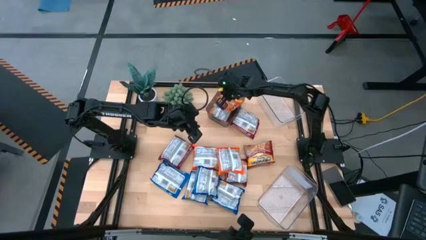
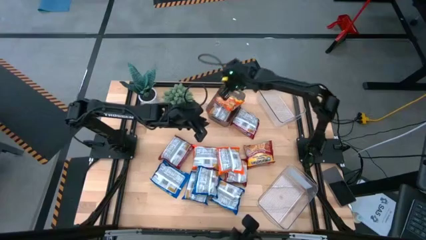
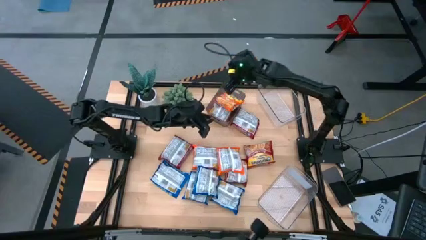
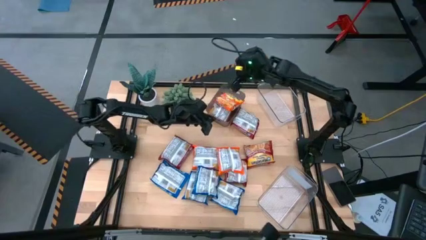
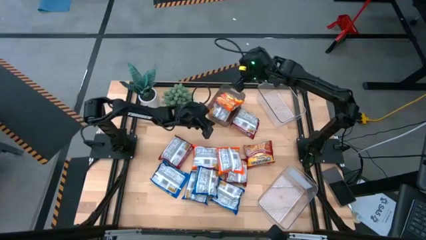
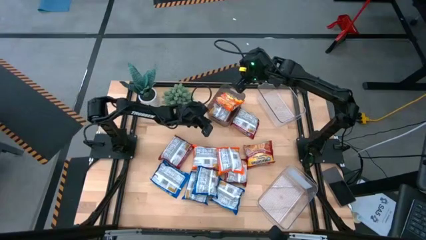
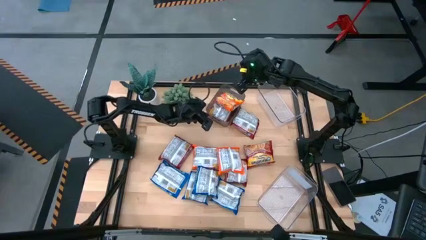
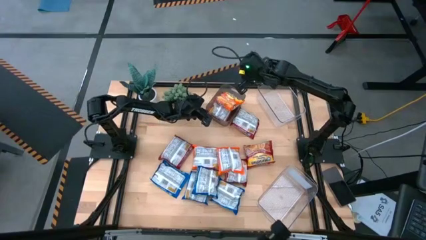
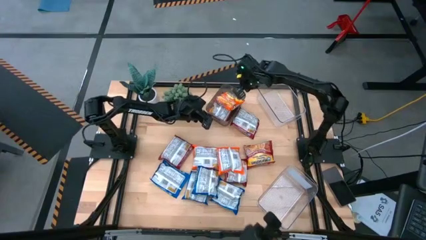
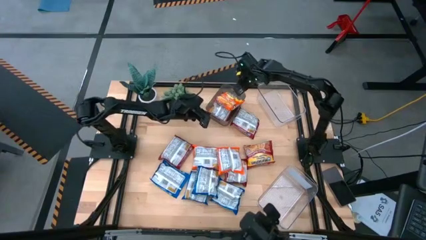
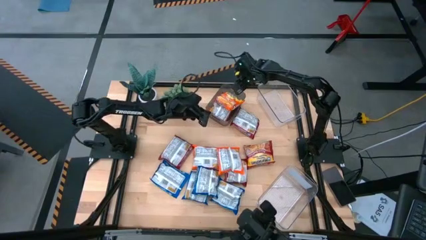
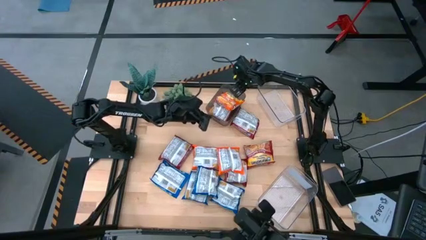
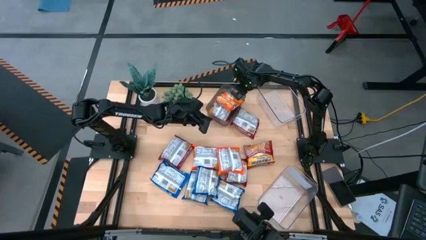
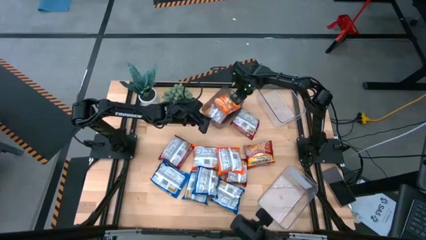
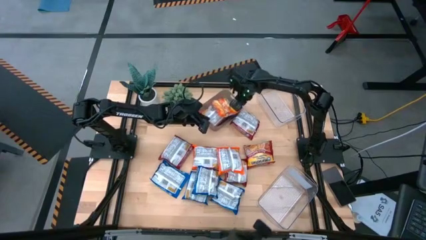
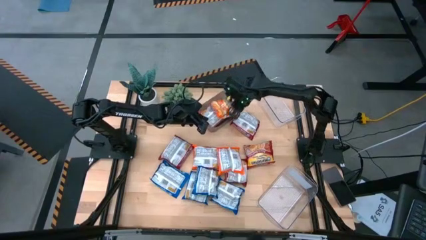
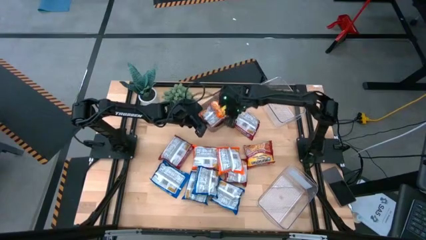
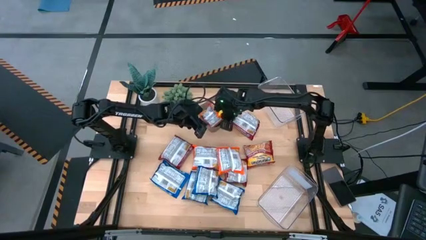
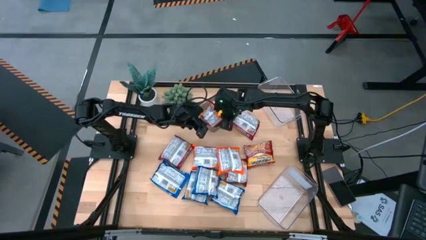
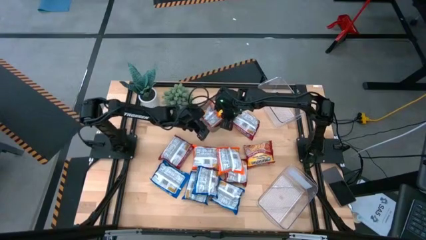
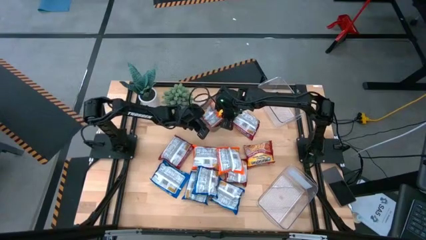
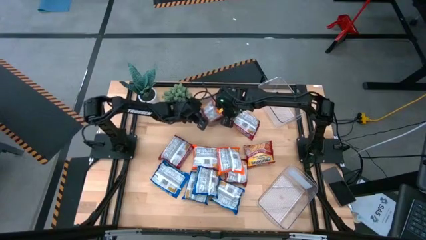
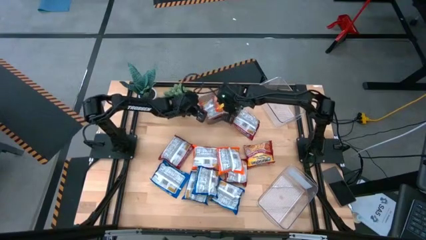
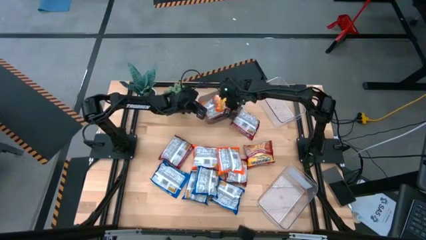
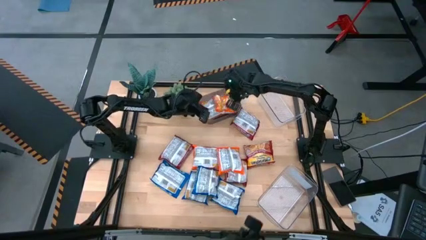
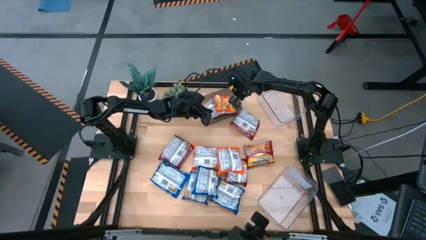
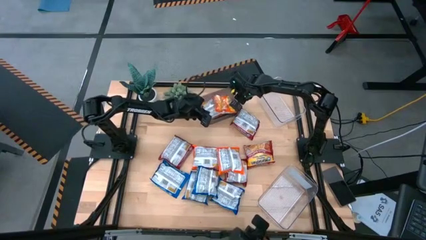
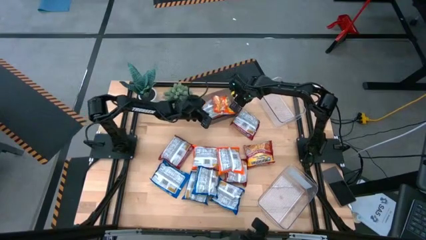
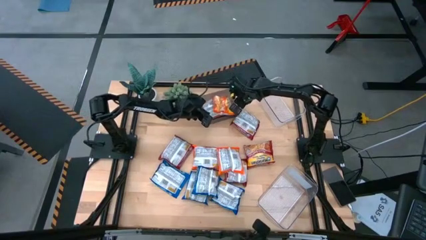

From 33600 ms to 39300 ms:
Task: Sort Maruchan noodles
Adjust the black bin

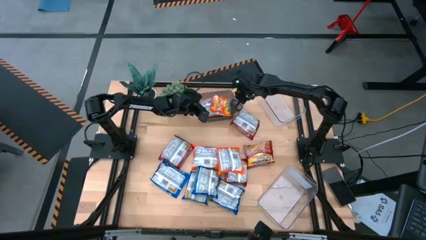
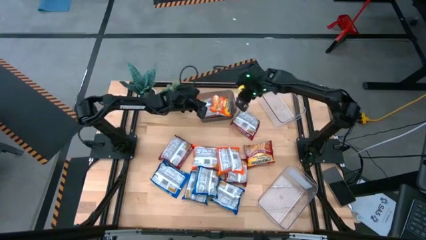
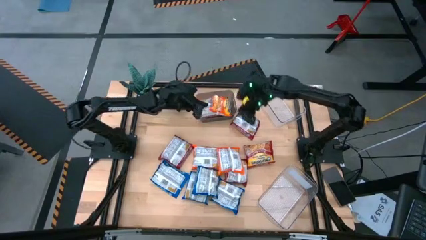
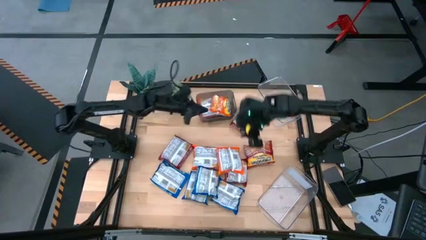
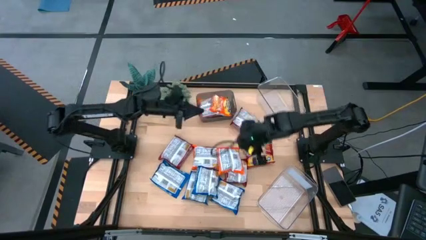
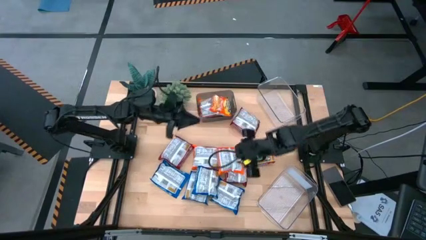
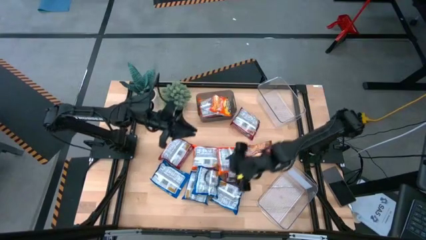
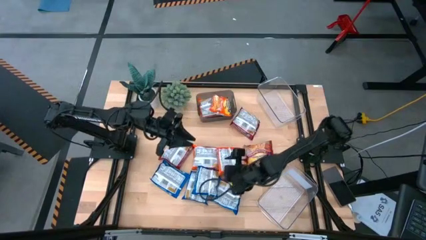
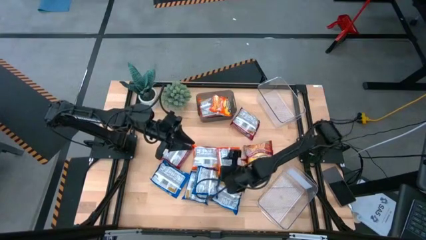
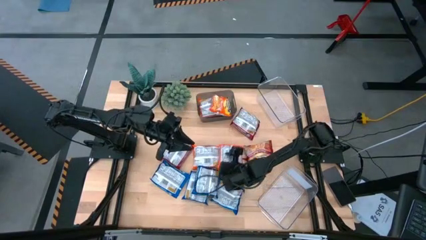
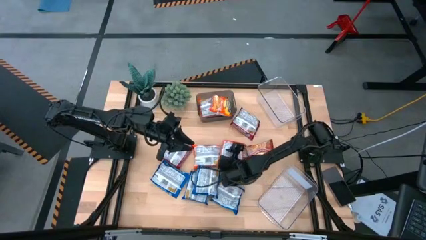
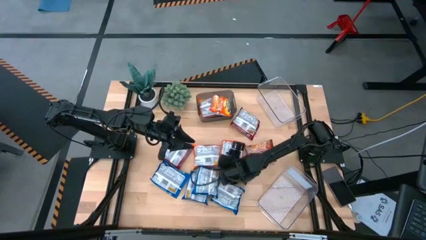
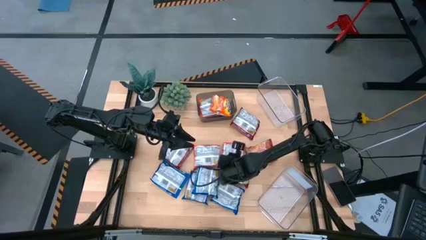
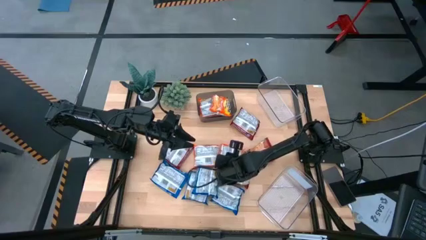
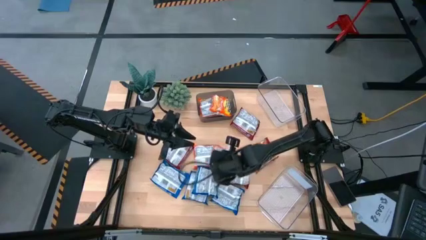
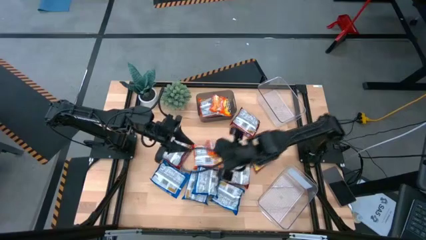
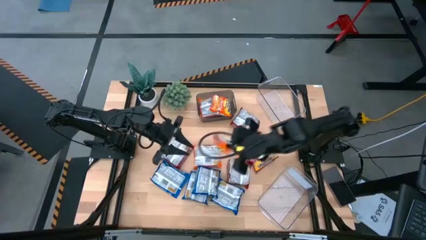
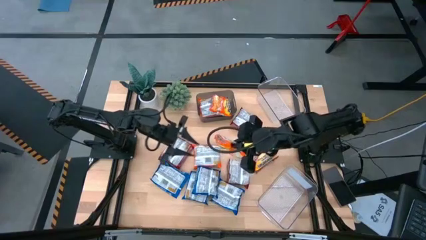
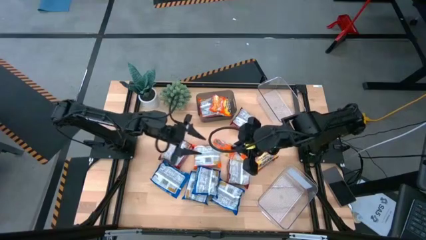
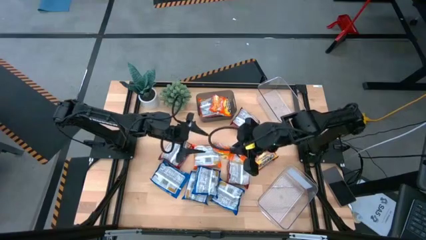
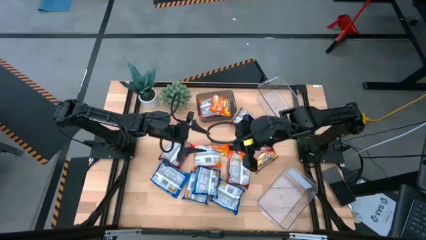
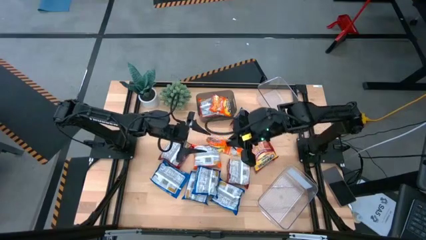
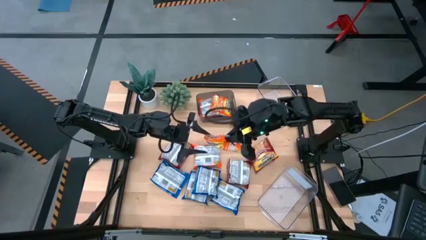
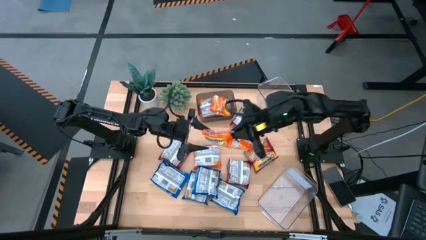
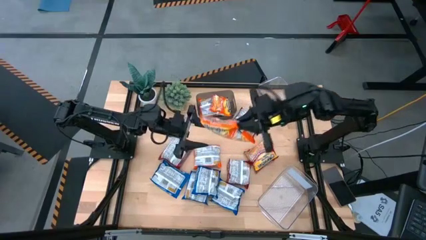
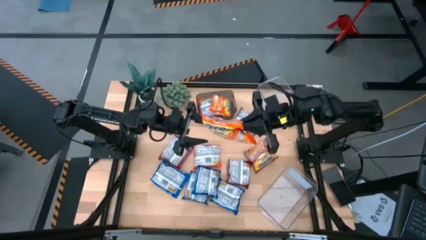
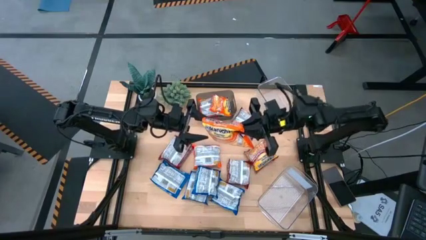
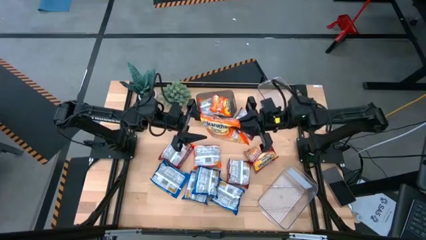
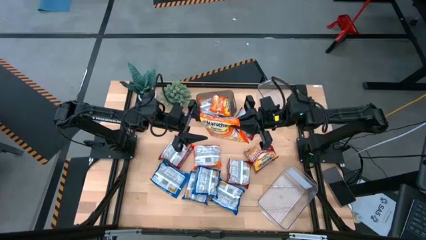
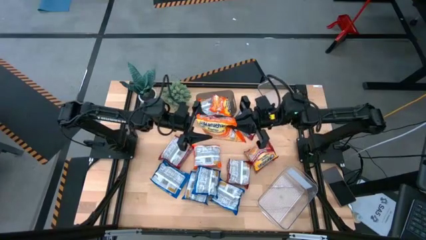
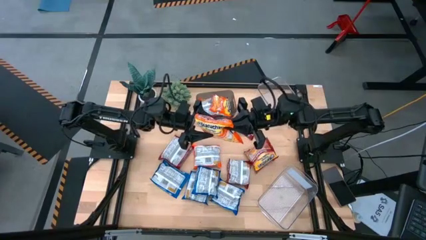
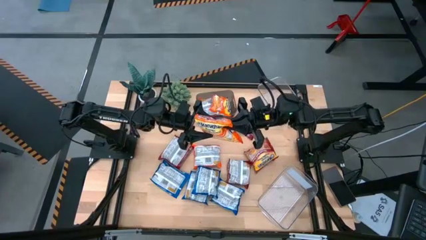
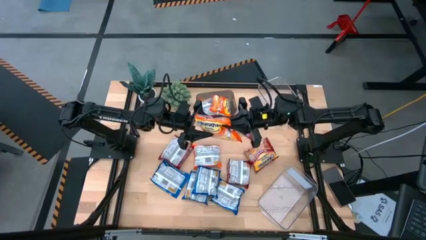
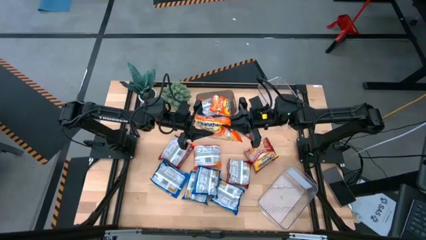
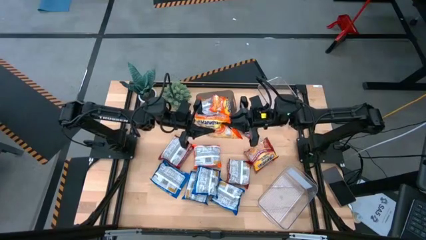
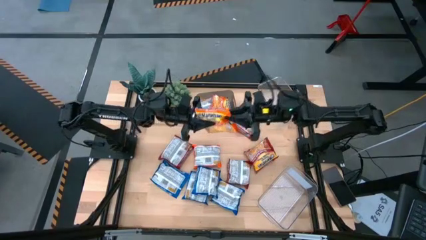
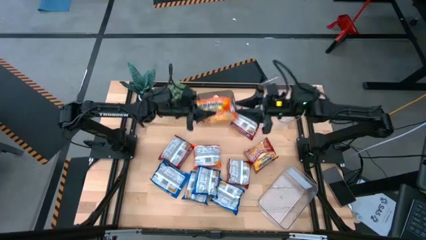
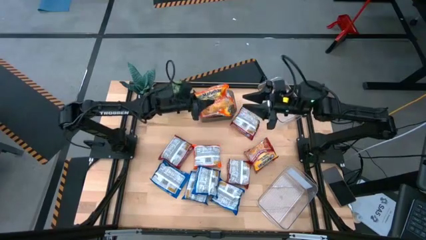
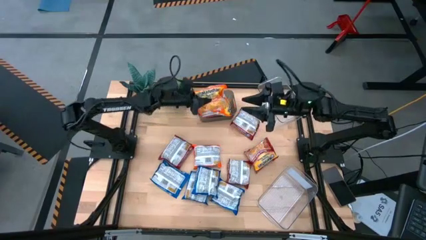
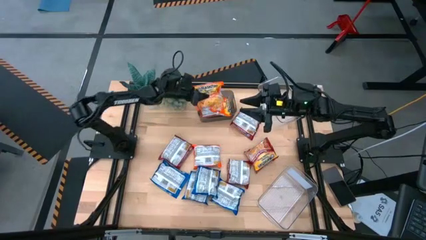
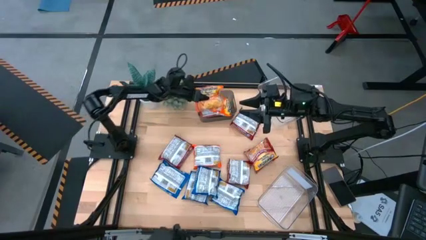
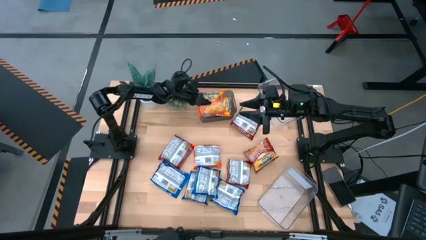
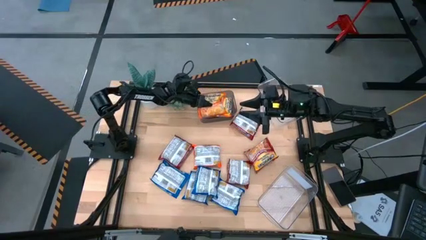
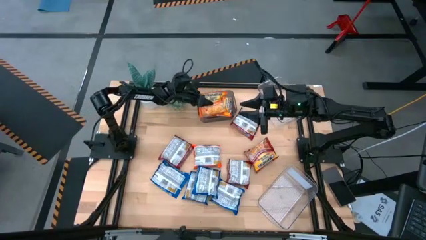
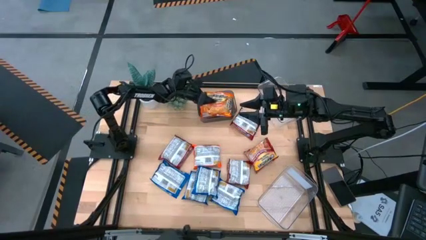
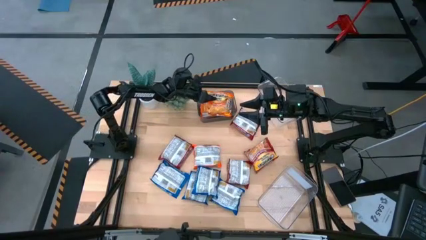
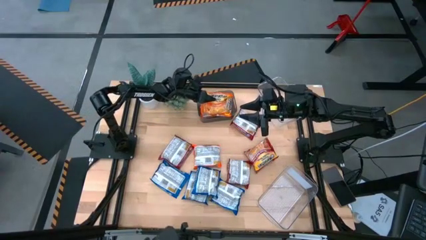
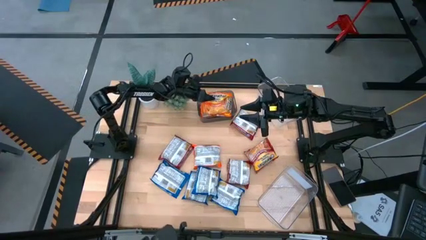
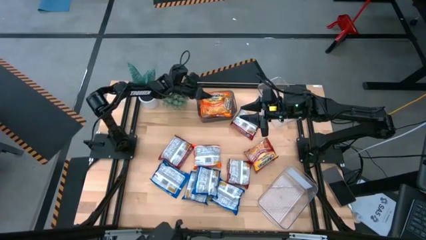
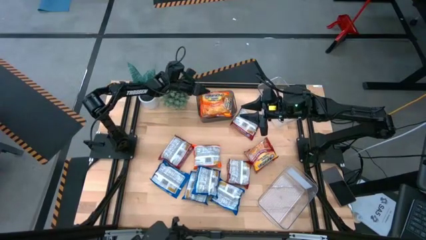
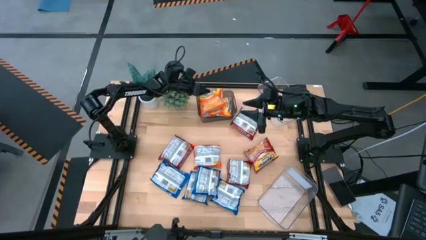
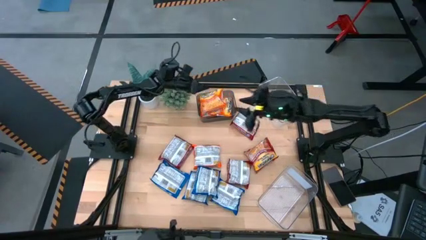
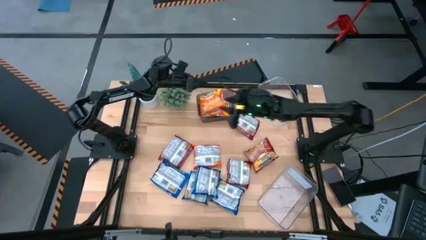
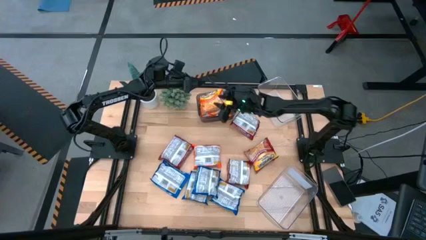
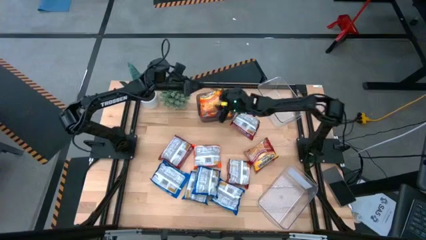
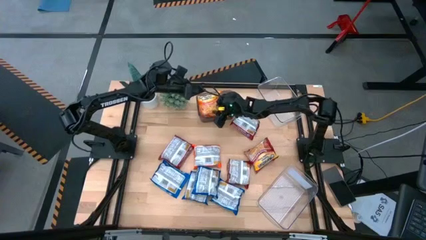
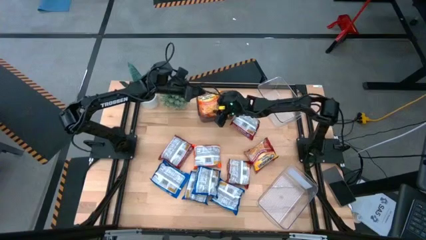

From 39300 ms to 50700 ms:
Put the orange noodle pack into the black bin
